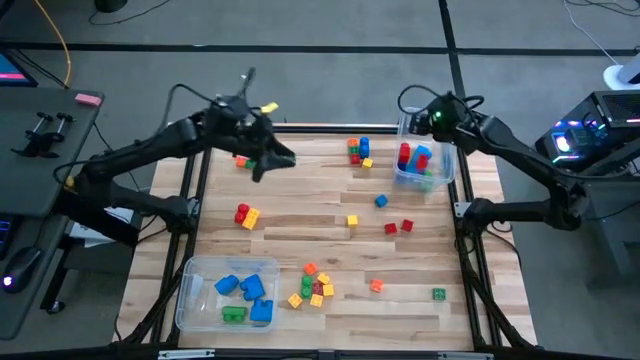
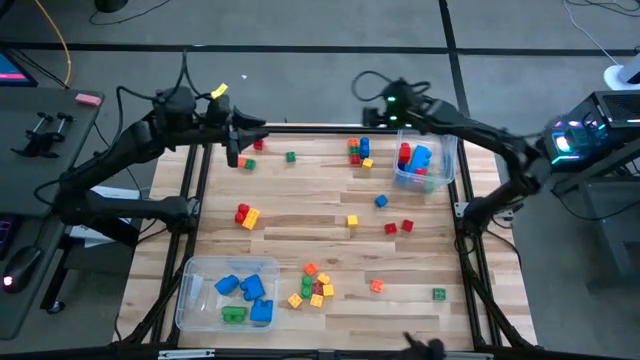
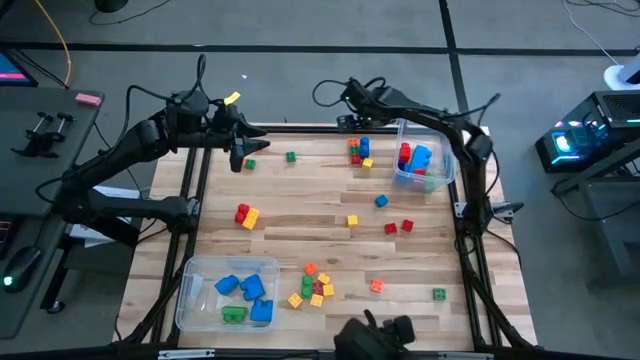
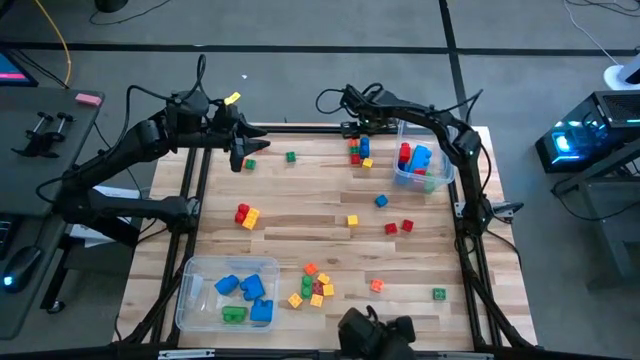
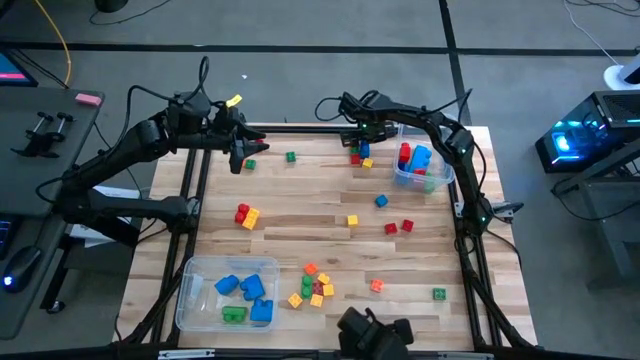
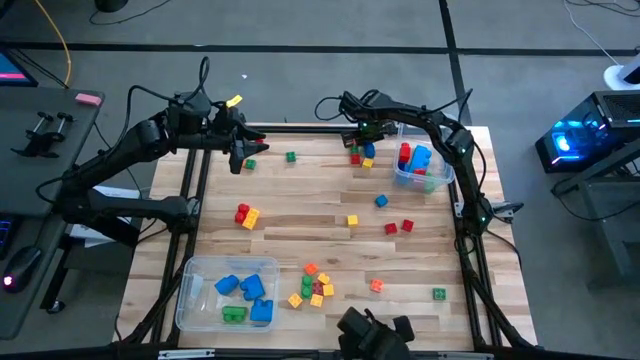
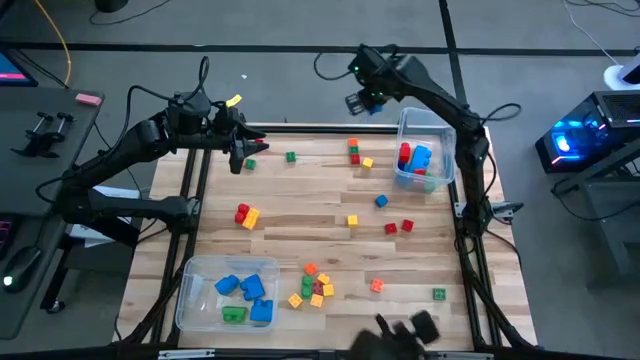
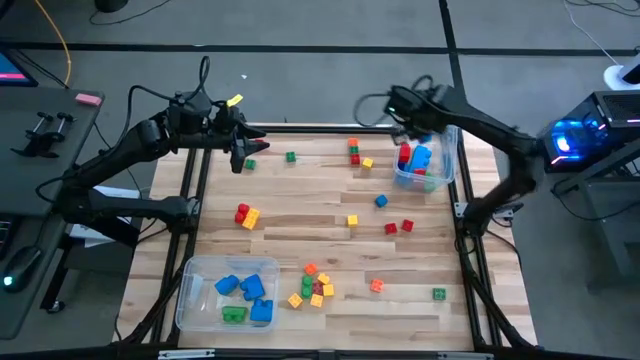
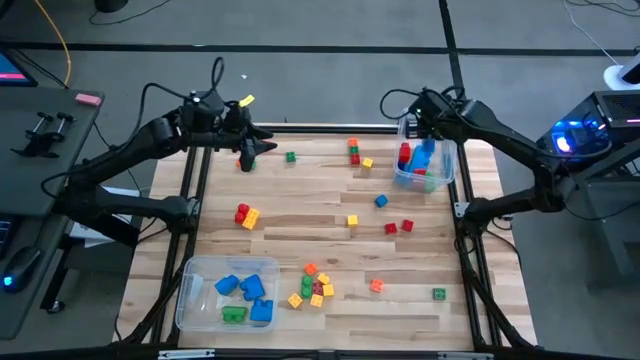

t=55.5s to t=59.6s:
Task: Sort blocks by size
Put the large blue game piece into the right transparent bin

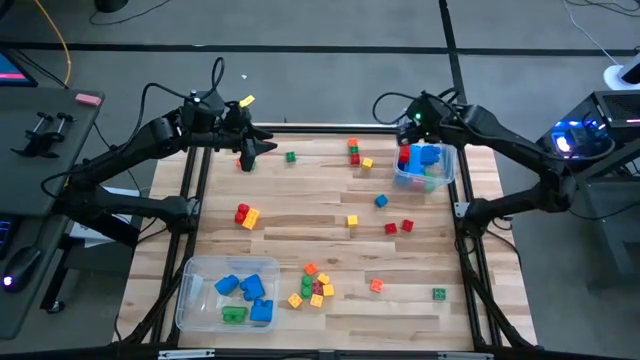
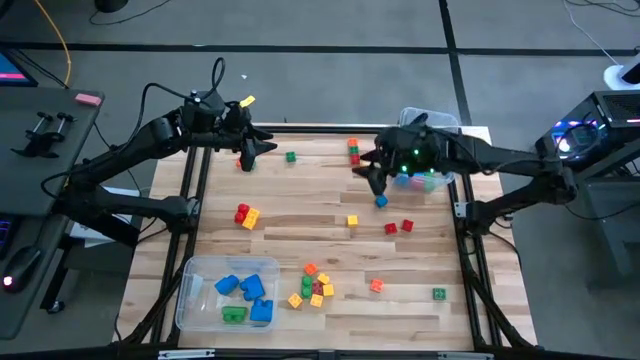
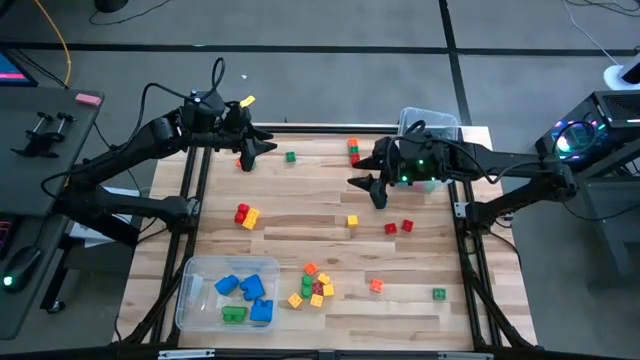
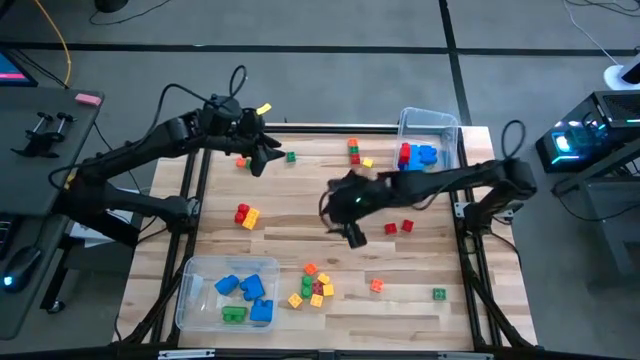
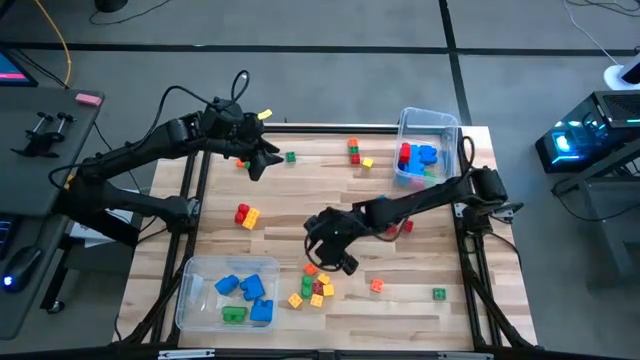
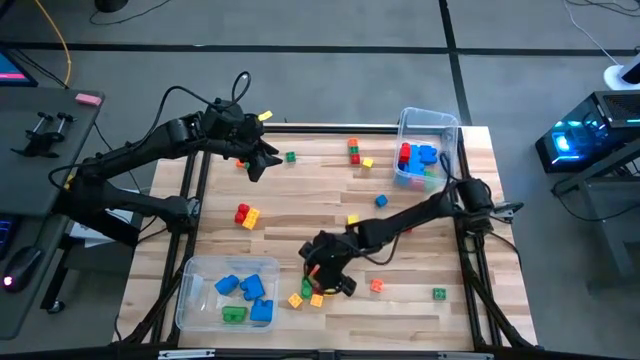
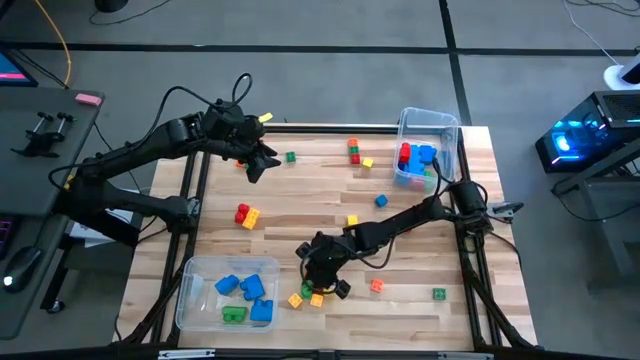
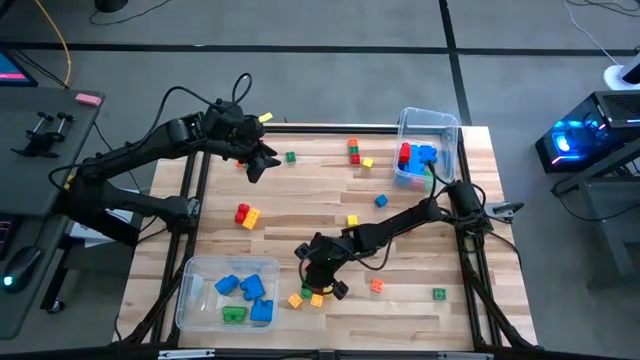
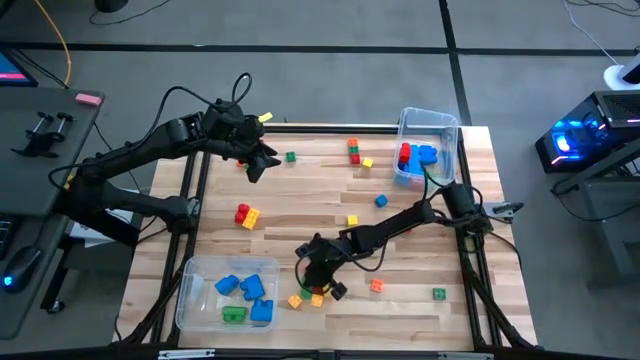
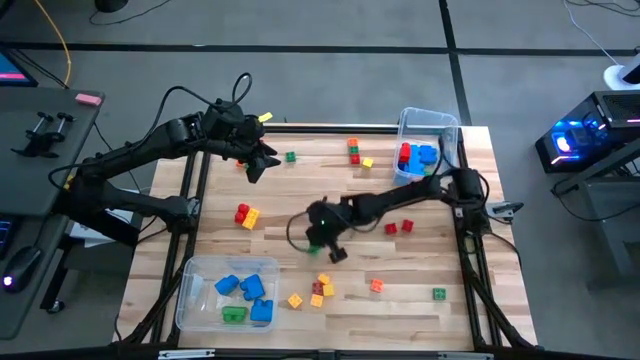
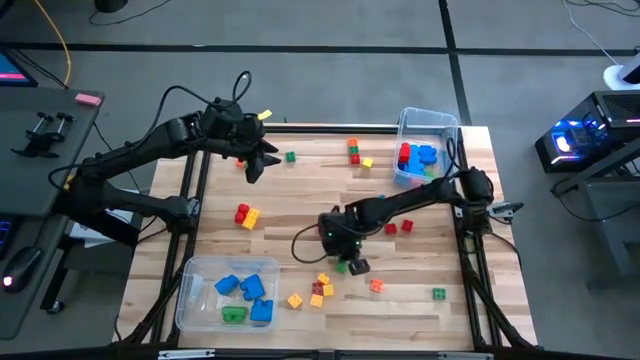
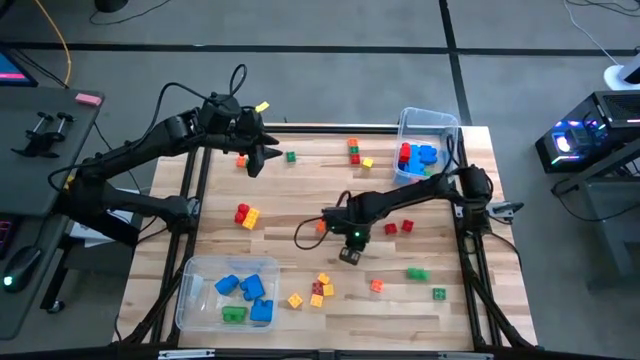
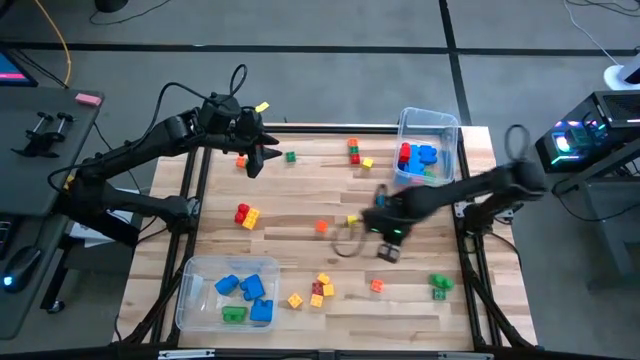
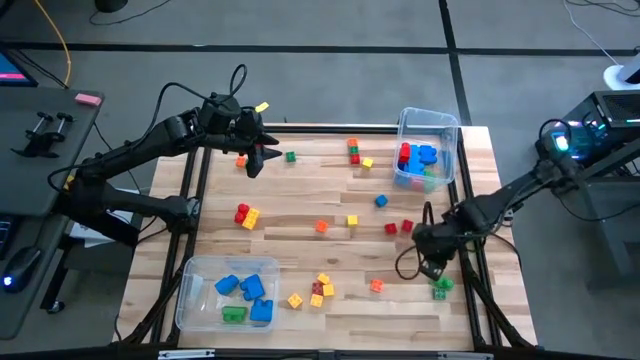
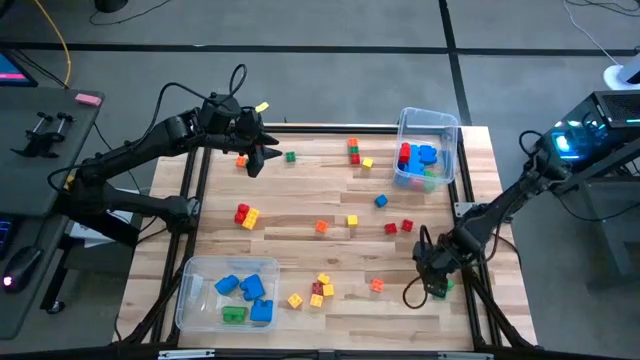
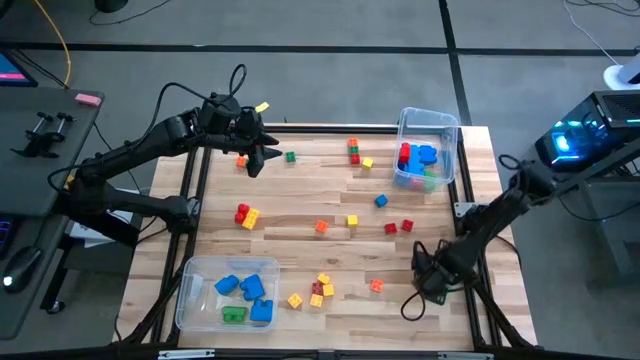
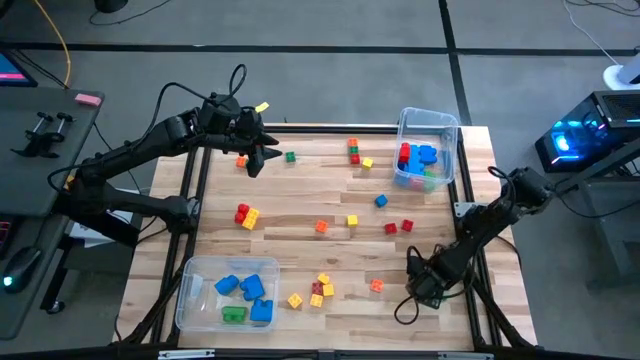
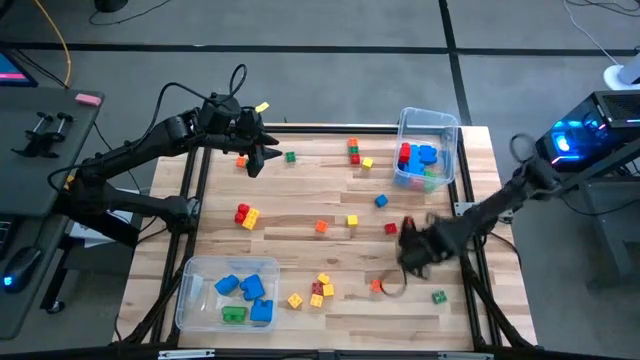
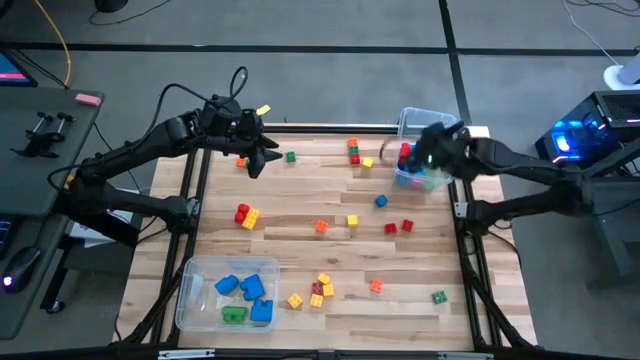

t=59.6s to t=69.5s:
Put the large green game piece into the right transparent bin

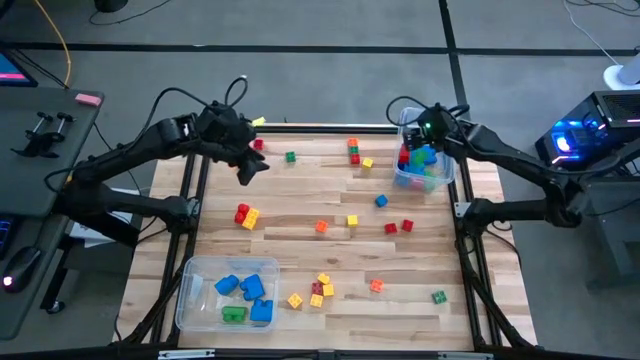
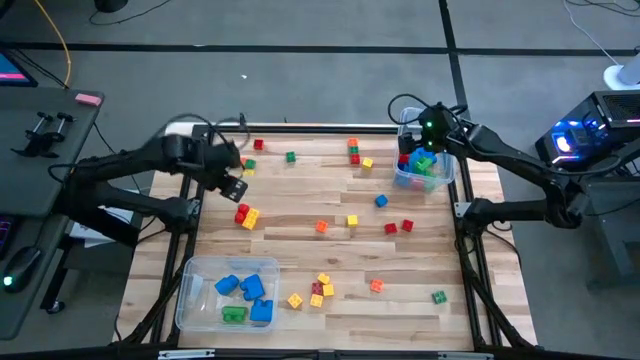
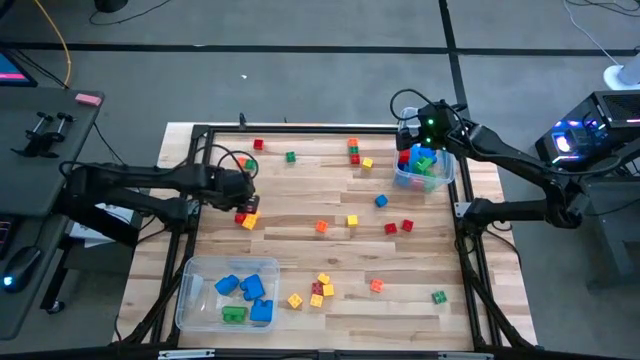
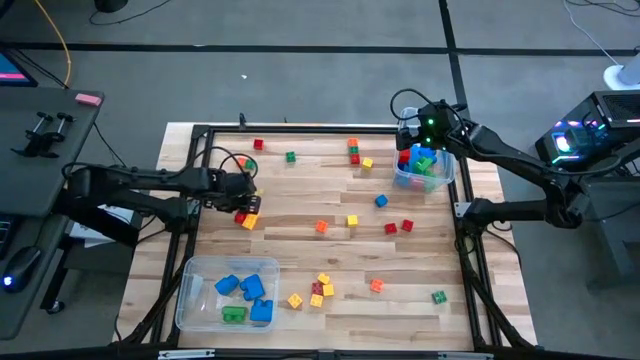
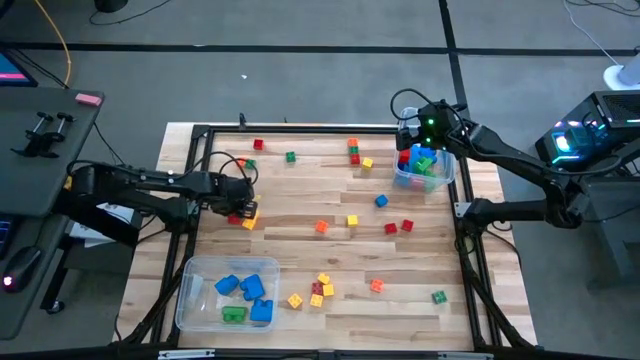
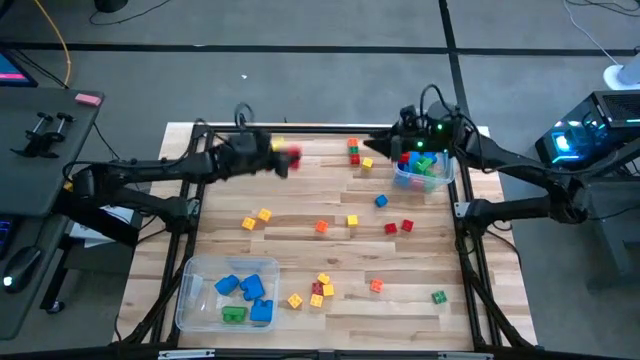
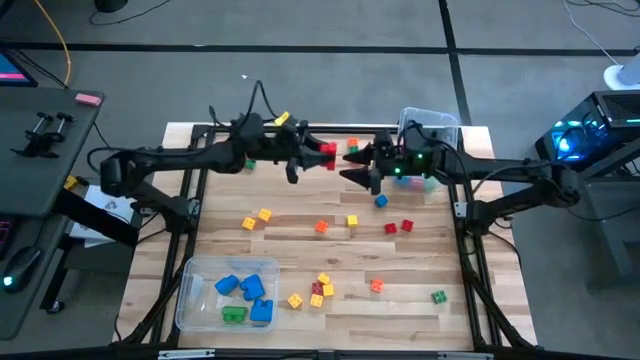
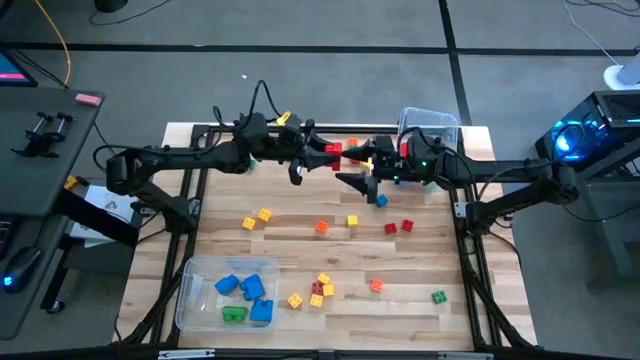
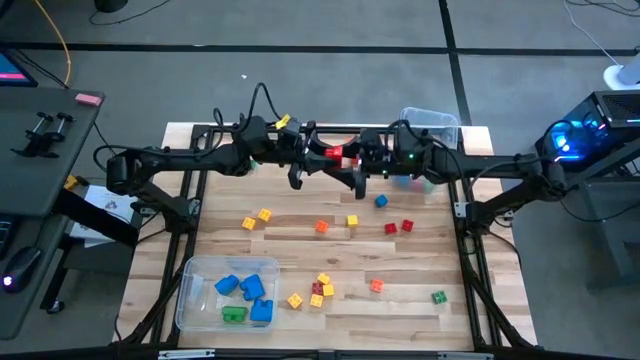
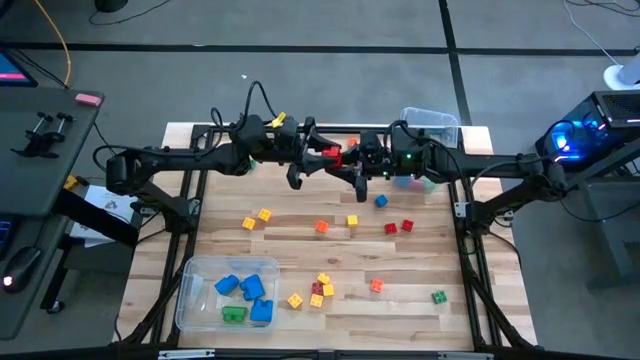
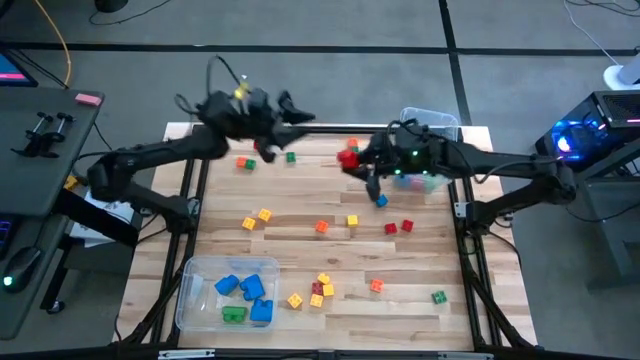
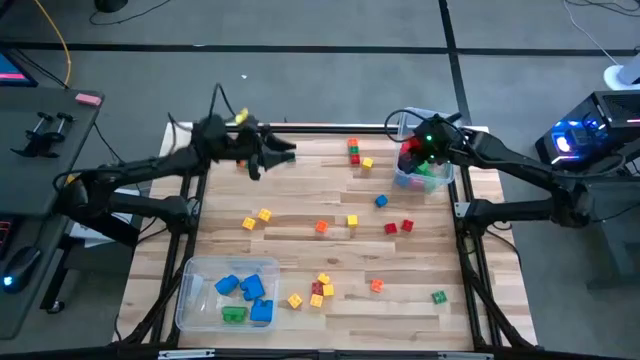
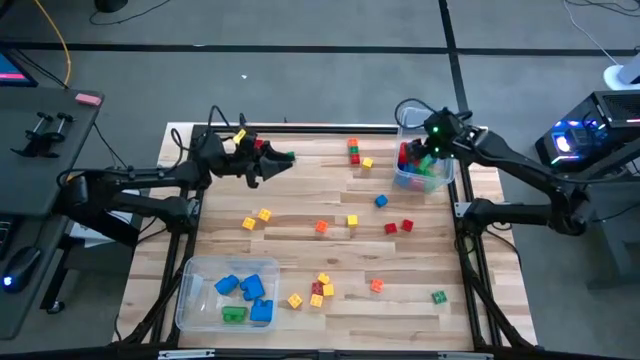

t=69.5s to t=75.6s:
Put the large red game piece into the right transparent bin

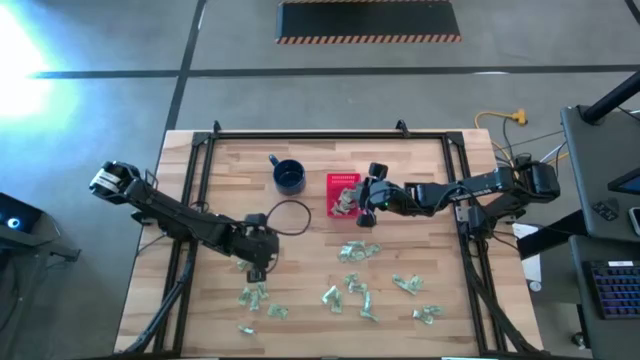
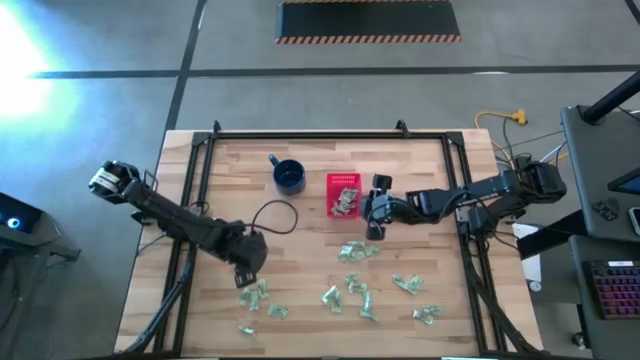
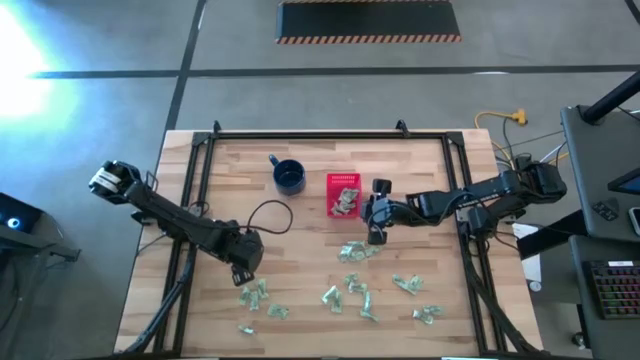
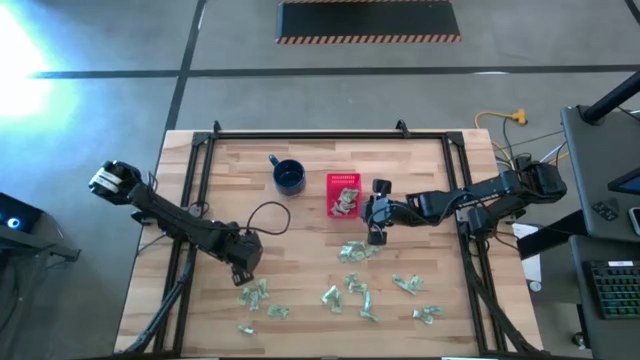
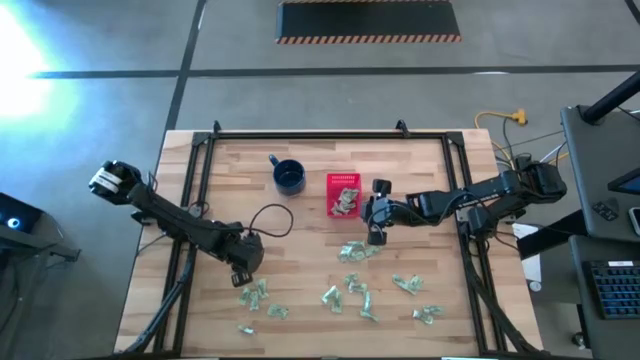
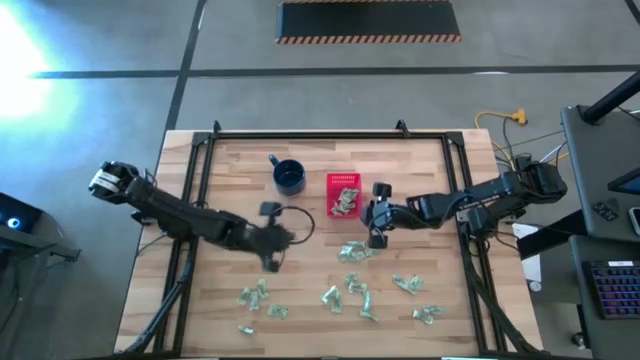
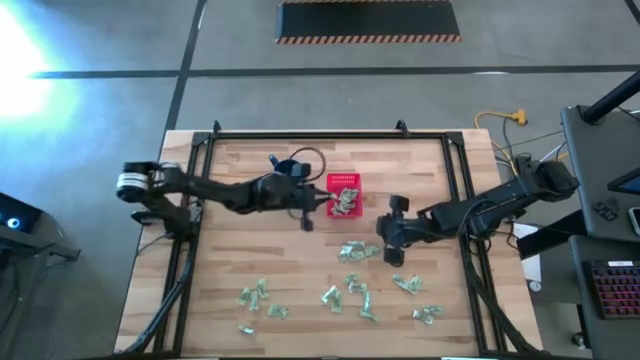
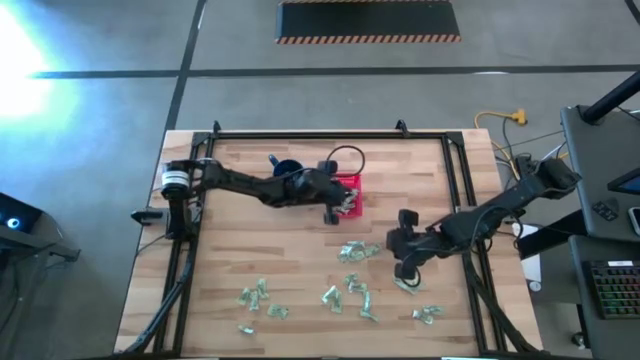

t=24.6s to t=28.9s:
Task: Pick and place items into bin
Put the green stevia packet into the red bin
